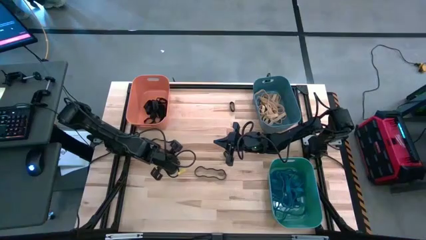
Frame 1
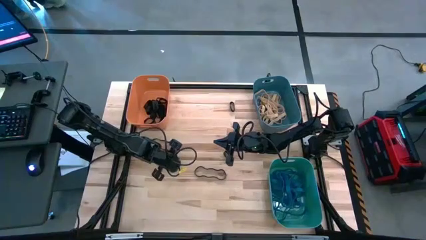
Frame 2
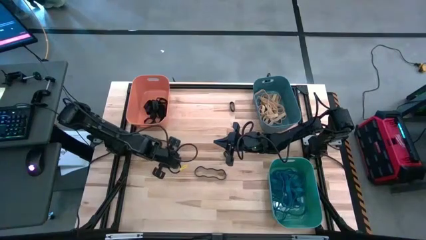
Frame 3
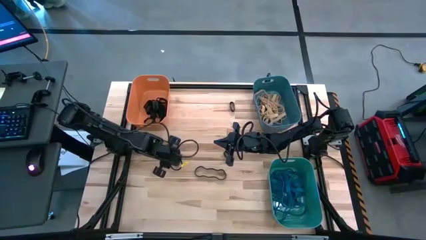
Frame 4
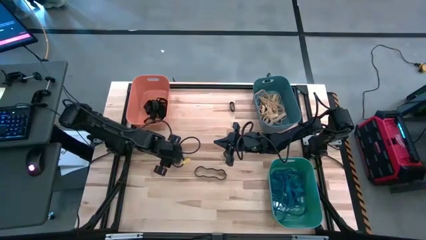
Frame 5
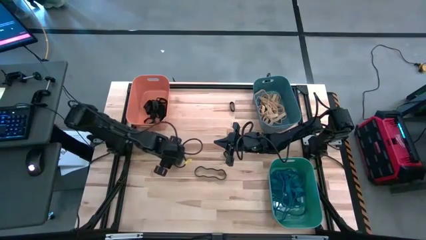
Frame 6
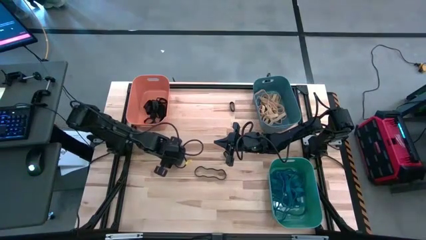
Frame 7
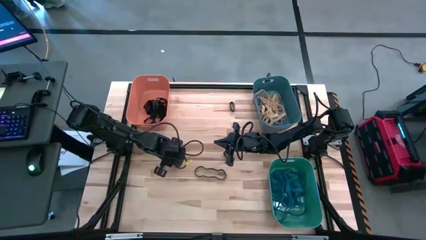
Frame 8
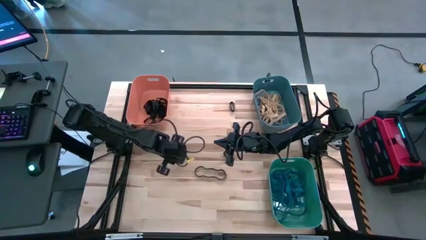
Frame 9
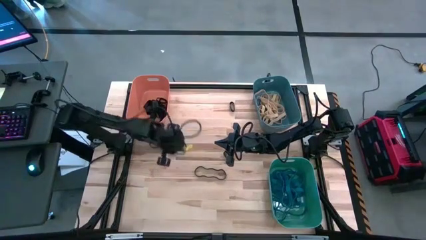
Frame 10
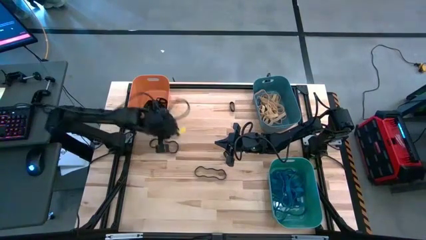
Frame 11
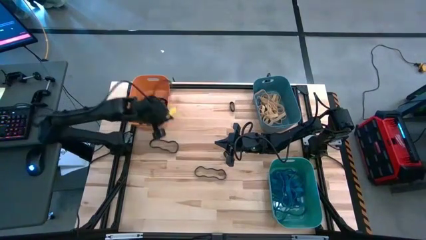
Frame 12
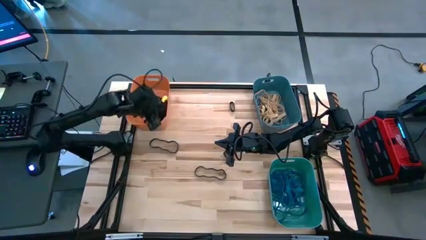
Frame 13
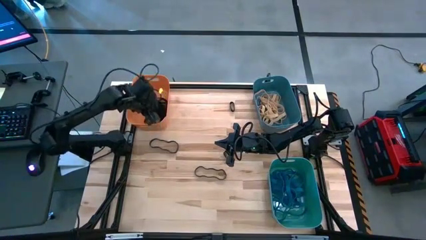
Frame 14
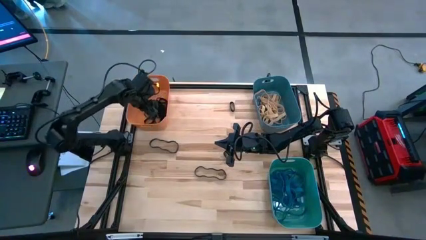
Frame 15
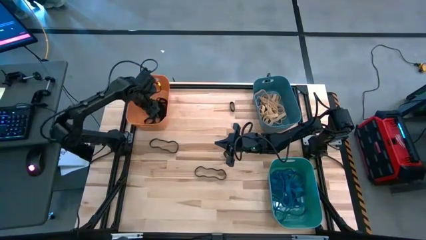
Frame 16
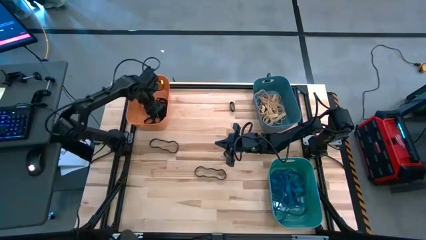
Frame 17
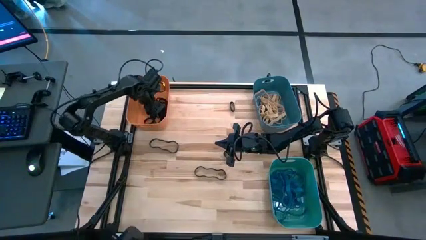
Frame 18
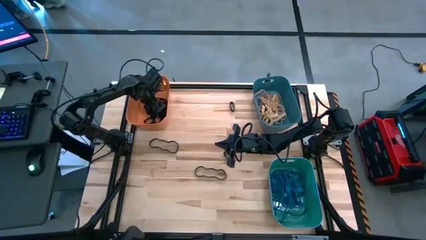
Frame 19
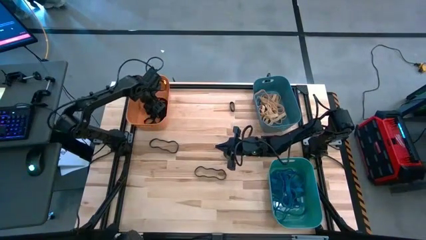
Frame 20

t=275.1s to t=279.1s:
Task: Sort rubber bands into baskets
Put the black rubber band into the orange bin

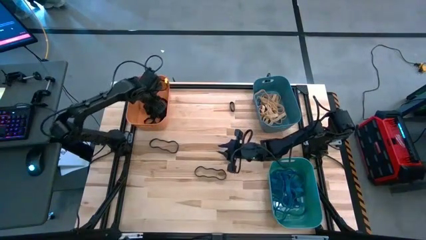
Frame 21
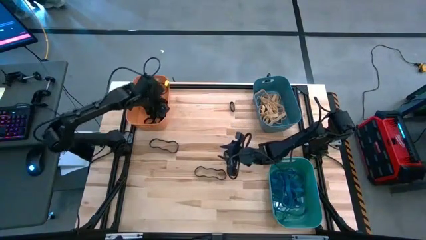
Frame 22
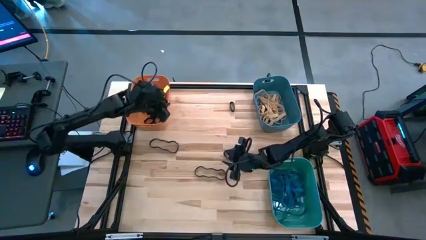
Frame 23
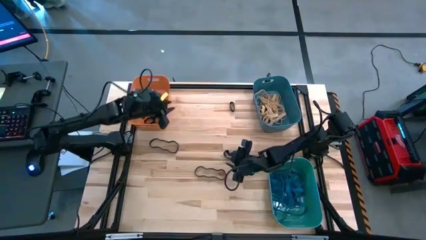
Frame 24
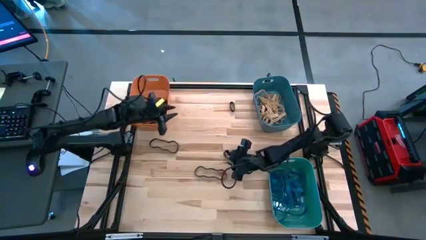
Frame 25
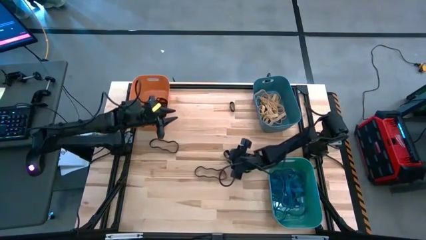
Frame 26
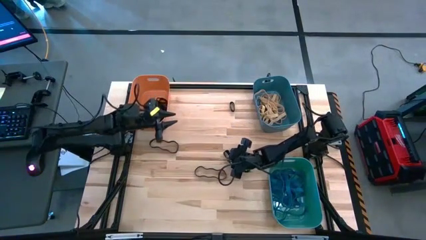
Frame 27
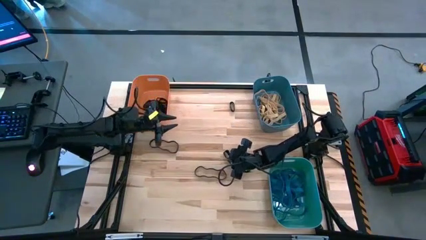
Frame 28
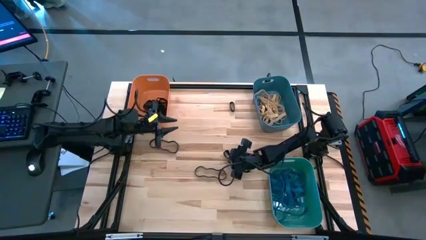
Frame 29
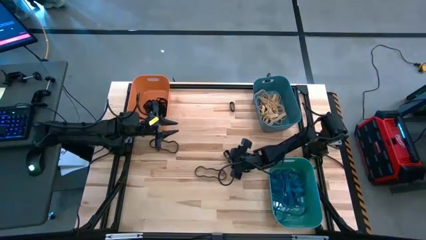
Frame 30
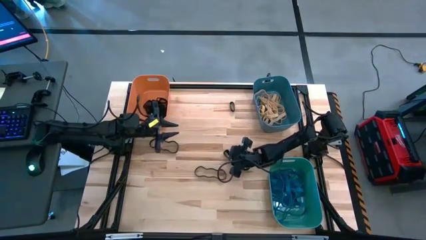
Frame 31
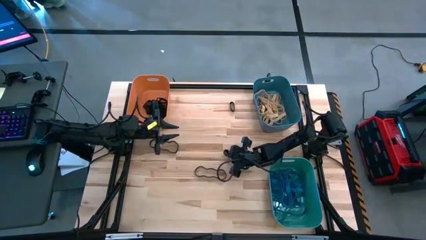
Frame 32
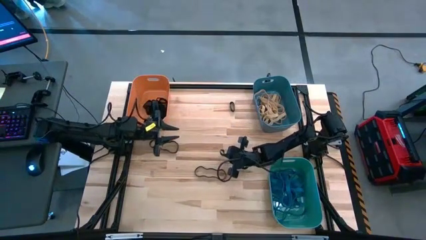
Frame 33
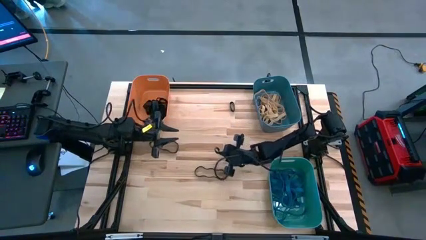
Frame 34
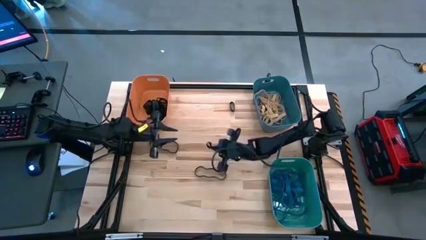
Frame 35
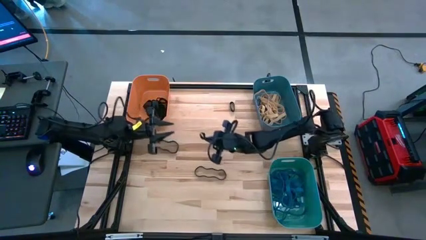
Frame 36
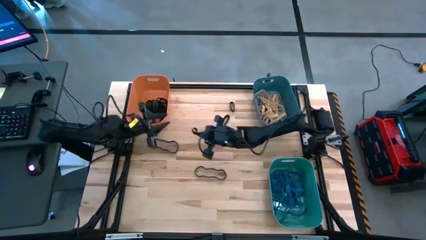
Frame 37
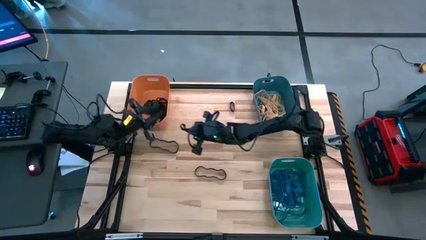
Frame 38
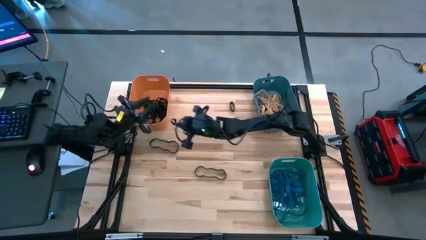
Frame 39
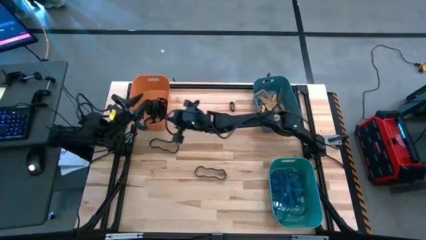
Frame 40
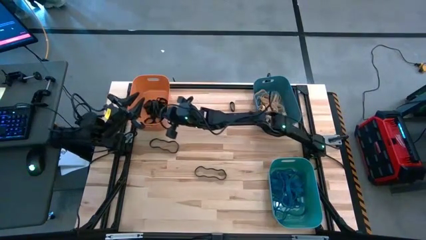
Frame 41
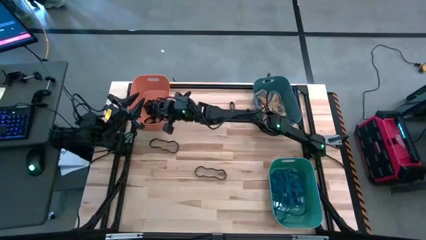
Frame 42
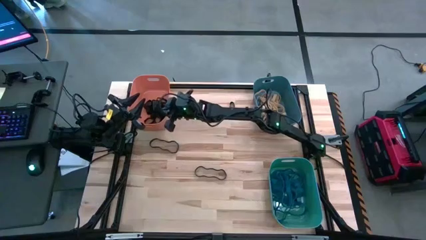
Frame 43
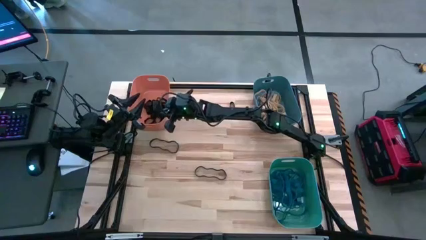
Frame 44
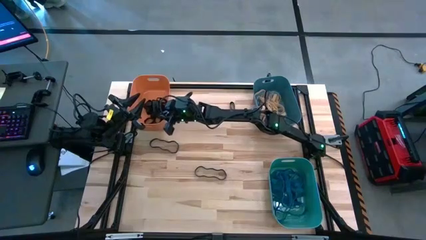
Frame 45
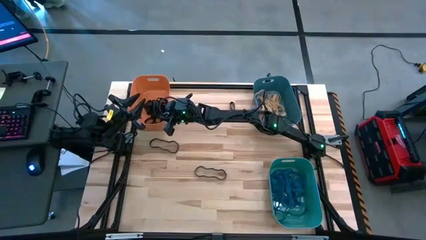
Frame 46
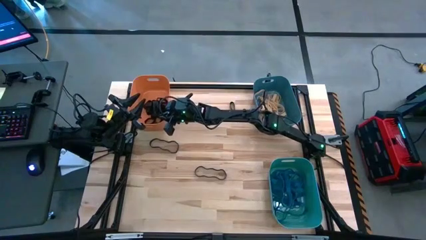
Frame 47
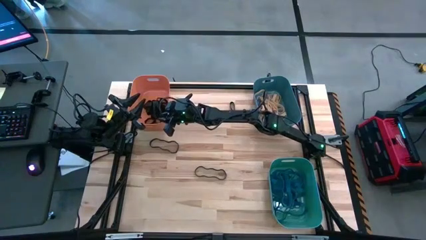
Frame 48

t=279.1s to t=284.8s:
Put the black rubber band into the orange bin

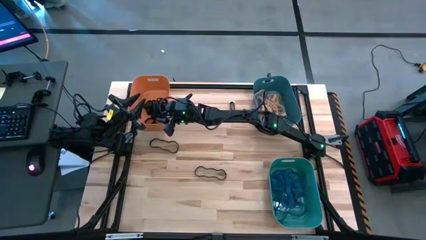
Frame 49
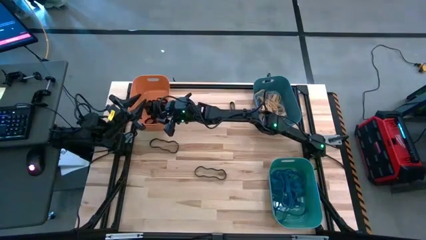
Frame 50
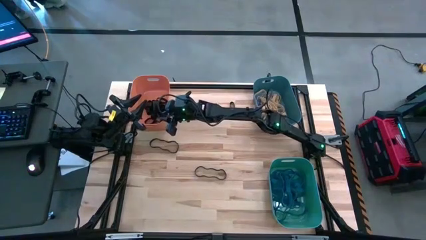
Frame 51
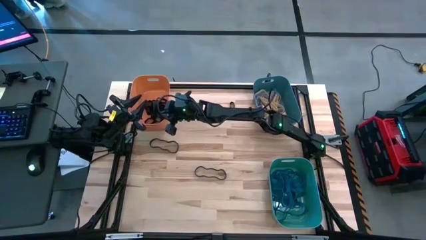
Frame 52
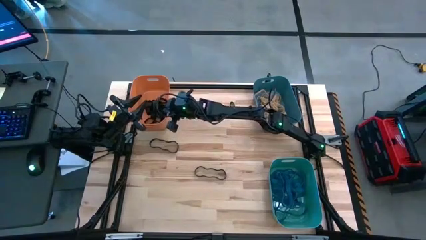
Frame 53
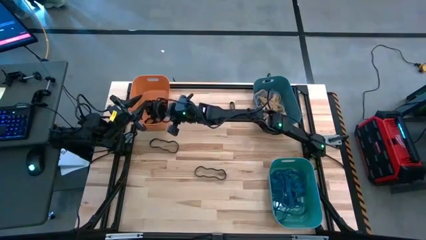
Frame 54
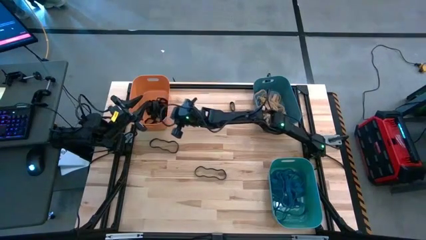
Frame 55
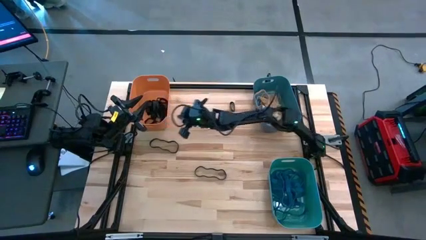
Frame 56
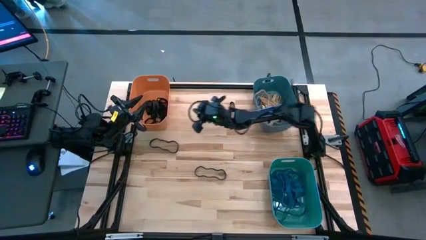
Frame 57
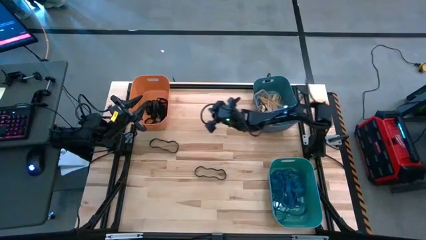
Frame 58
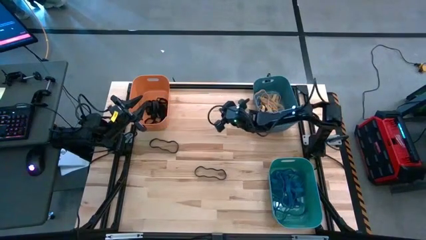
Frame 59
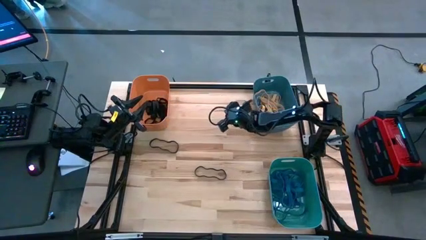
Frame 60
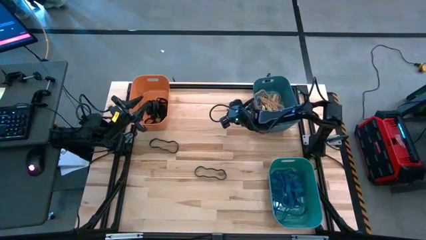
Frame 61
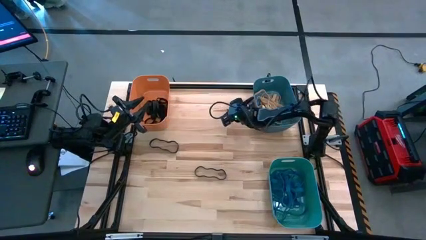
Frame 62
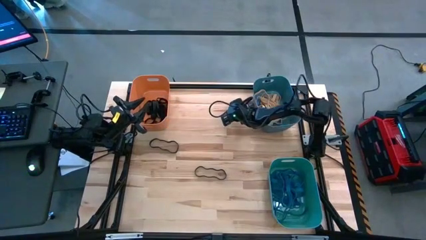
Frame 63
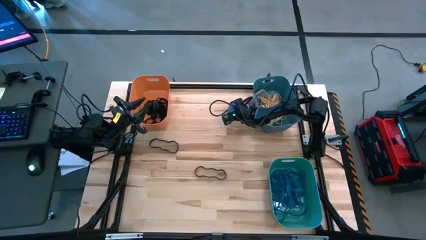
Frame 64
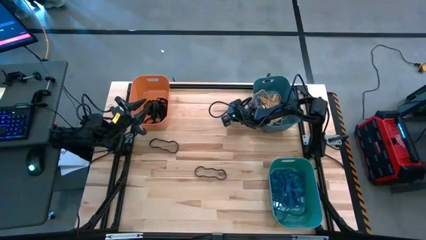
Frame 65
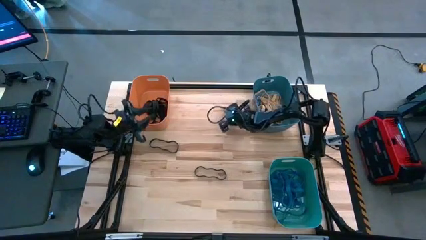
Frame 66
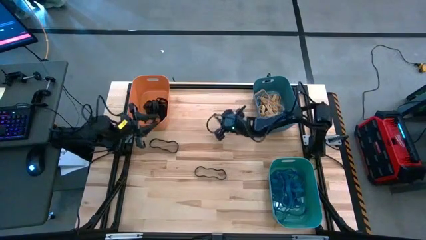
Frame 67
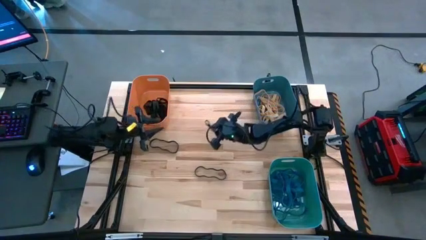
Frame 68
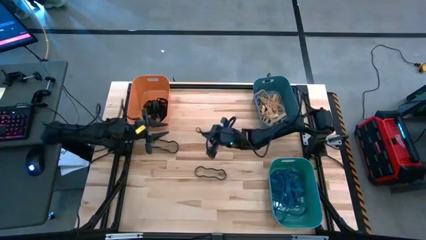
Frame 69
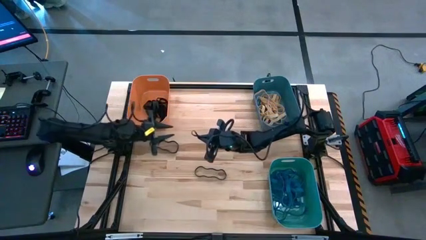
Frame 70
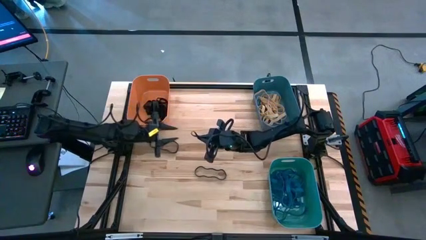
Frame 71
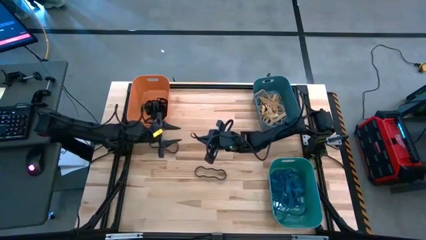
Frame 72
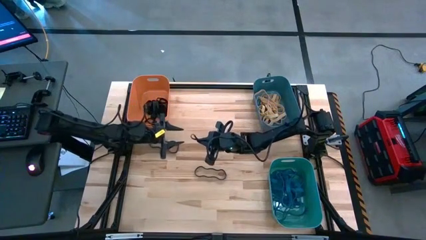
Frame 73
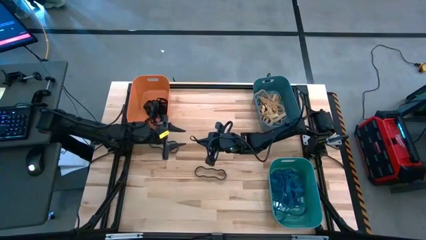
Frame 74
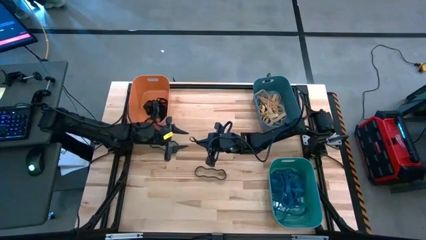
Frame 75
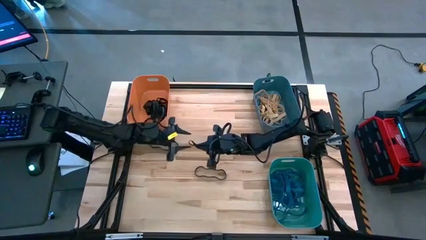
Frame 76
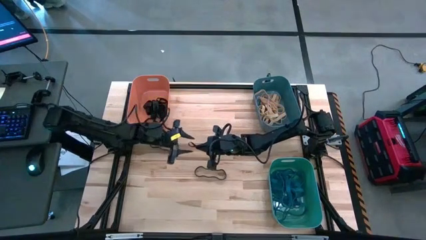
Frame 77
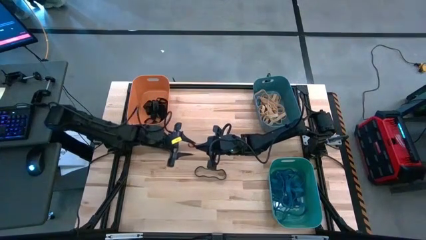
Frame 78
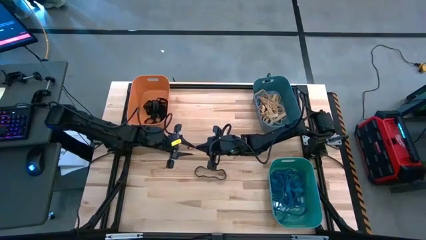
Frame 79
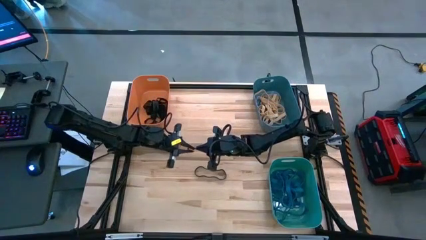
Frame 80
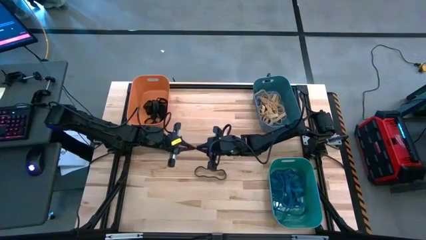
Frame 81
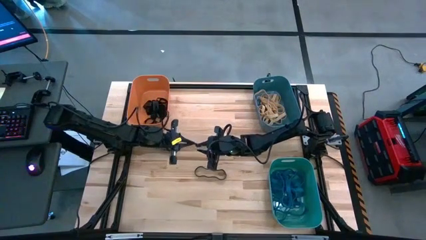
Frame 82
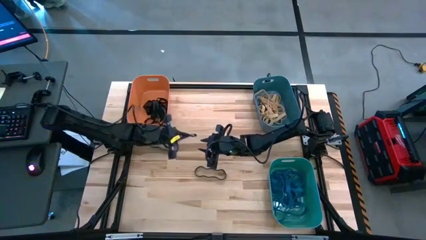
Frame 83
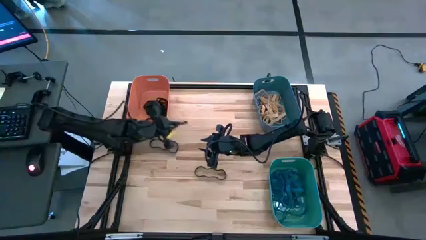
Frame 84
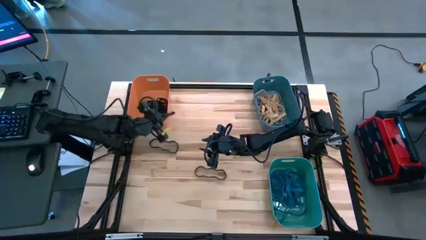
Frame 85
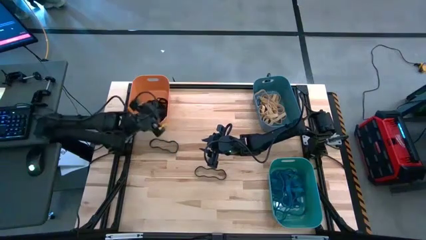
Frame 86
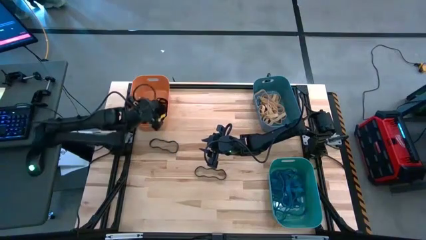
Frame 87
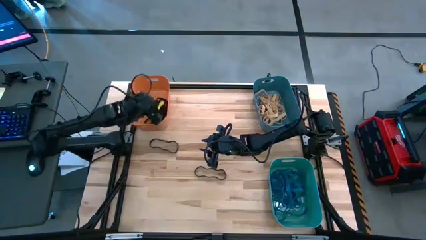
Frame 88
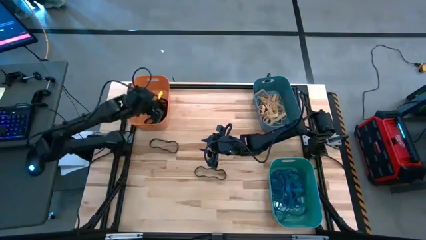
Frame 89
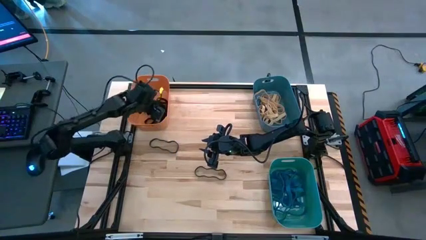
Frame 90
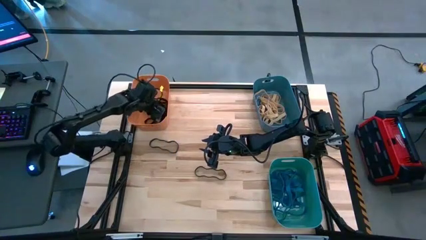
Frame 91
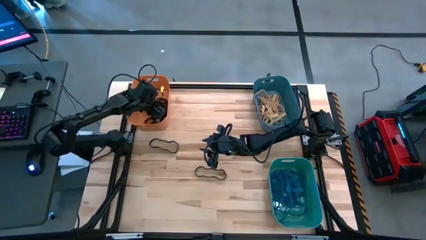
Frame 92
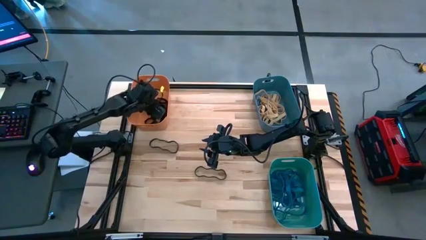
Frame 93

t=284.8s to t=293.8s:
Put the black rubber band into the orange bin
